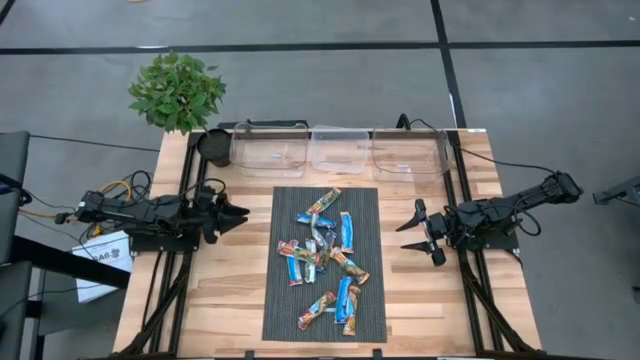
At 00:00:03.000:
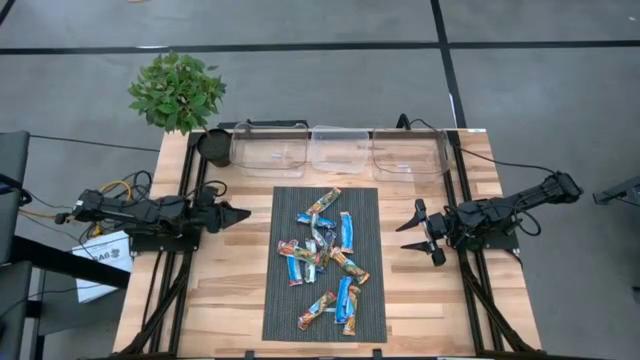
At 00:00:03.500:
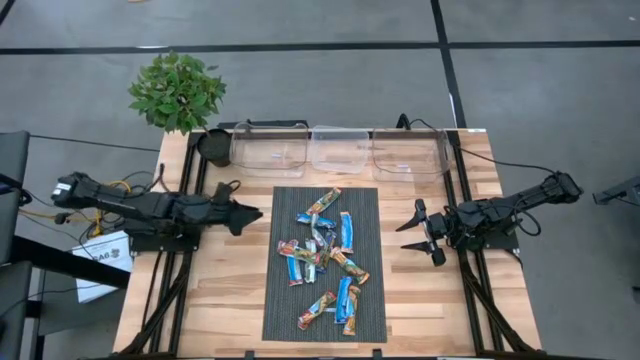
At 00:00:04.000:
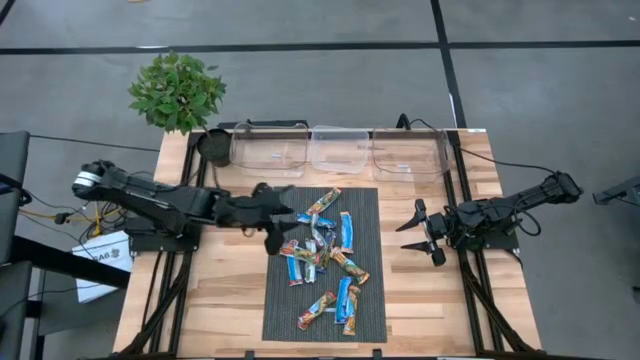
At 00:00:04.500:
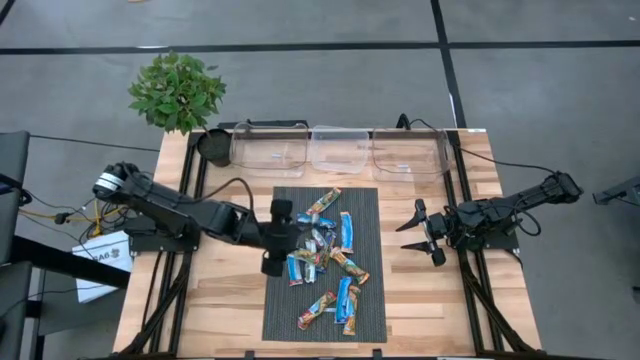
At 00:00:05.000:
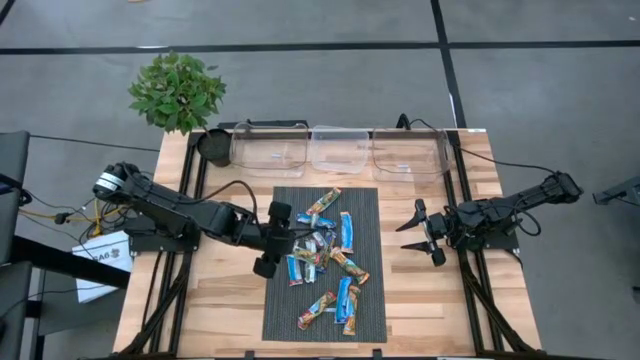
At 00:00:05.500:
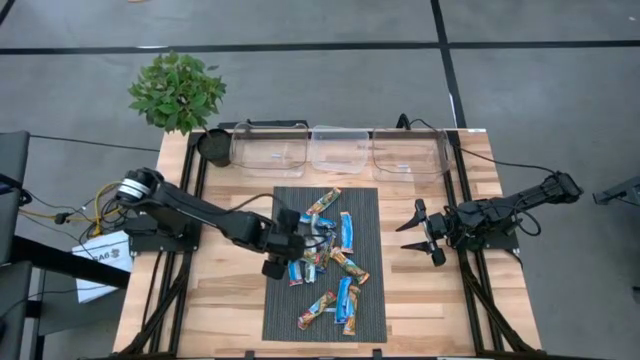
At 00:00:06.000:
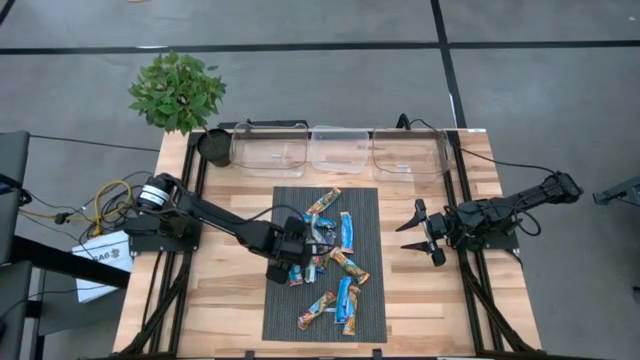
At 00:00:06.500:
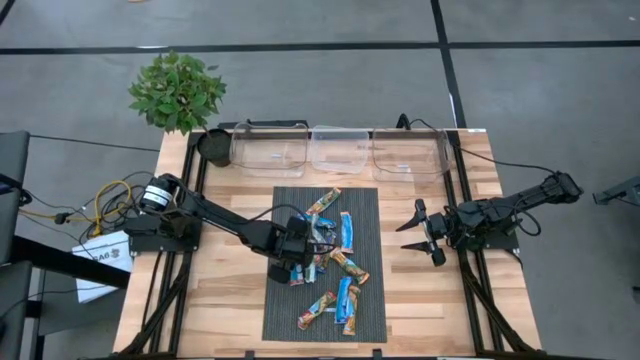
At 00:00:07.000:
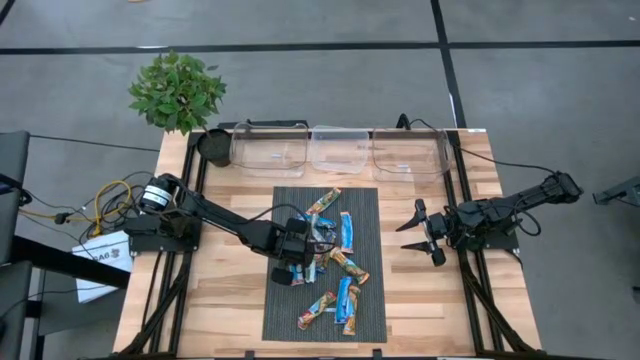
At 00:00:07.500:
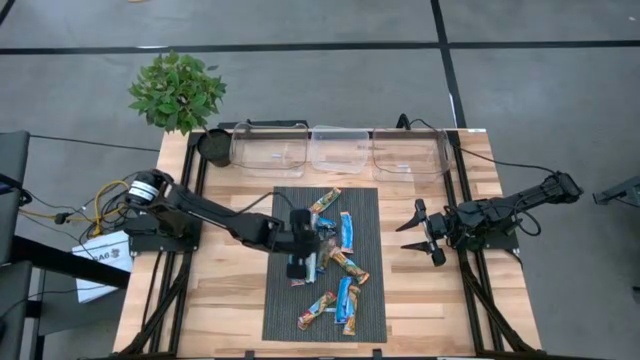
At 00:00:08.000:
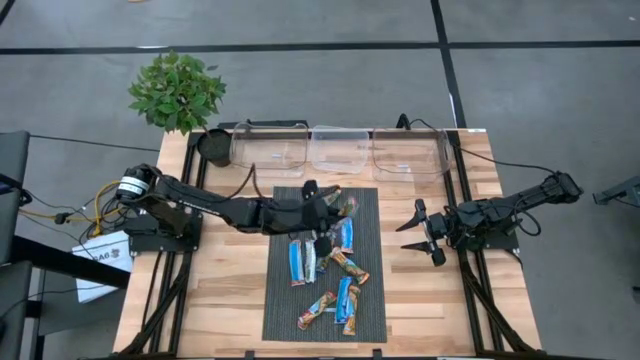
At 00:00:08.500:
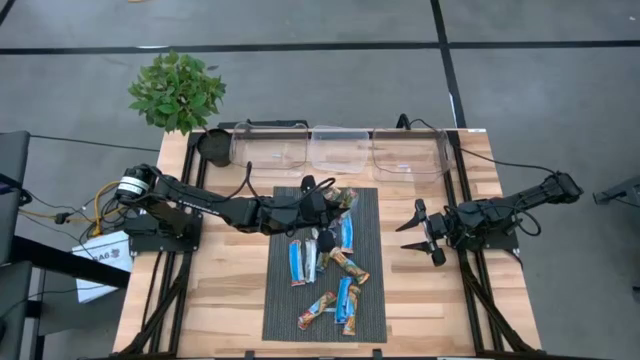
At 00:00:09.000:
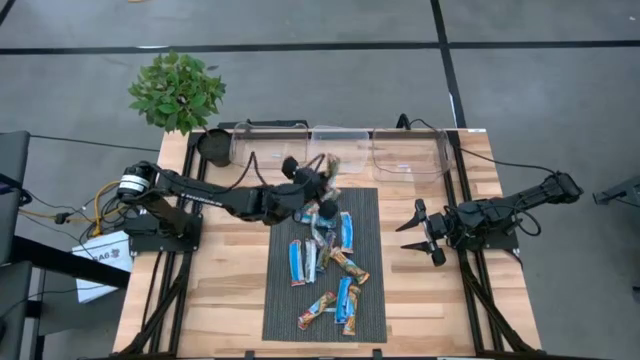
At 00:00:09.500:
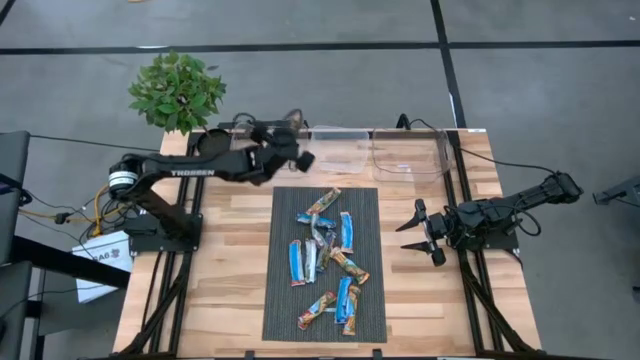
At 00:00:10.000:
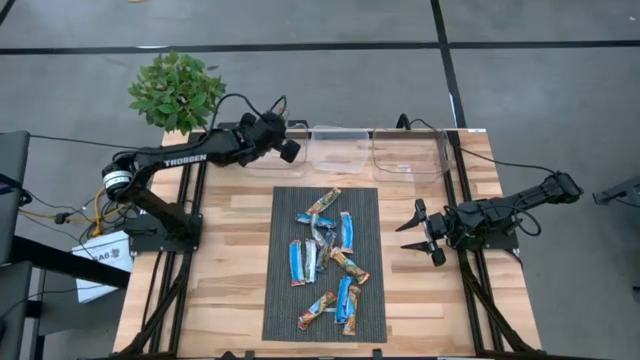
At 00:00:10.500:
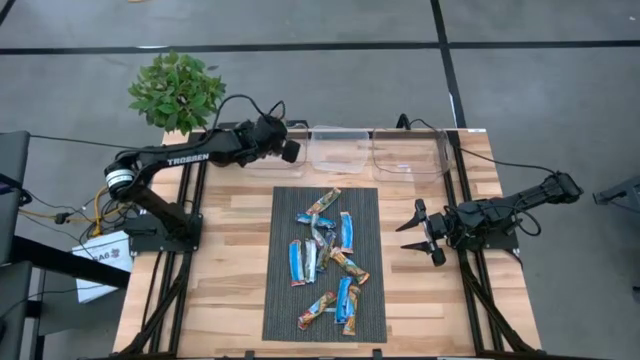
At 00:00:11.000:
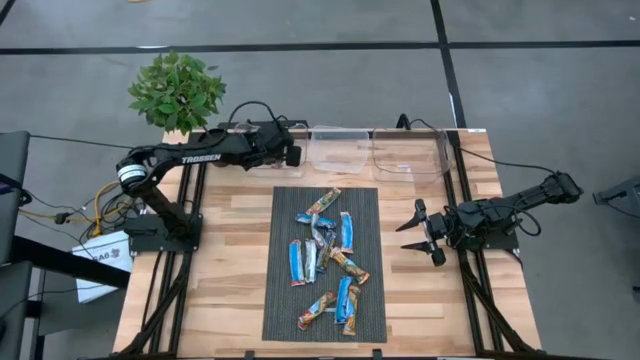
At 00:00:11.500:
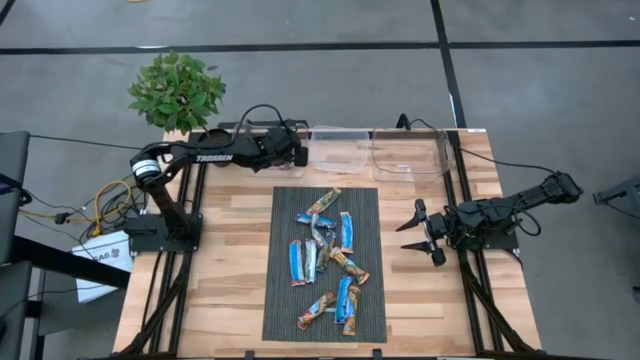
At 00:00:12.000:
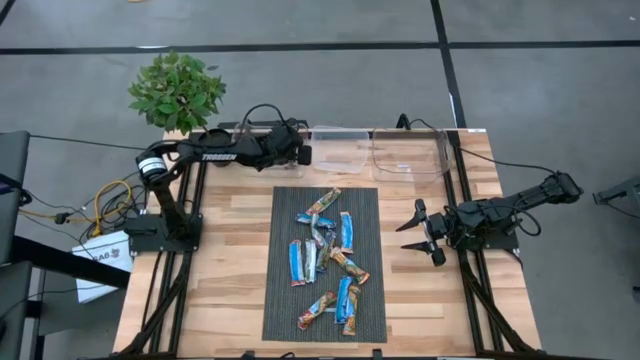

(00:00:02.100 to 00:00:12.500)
Task: Pick and place Granola Bars by type
Put the red granola bar into the left transparent bin

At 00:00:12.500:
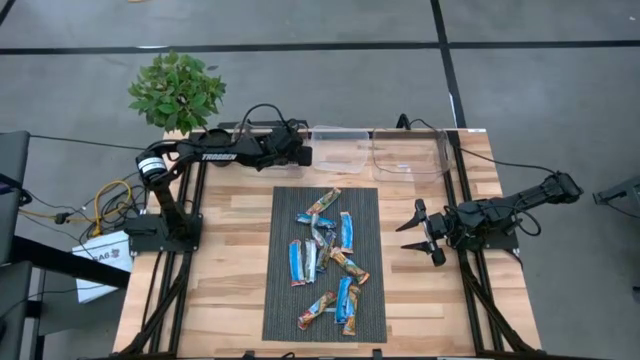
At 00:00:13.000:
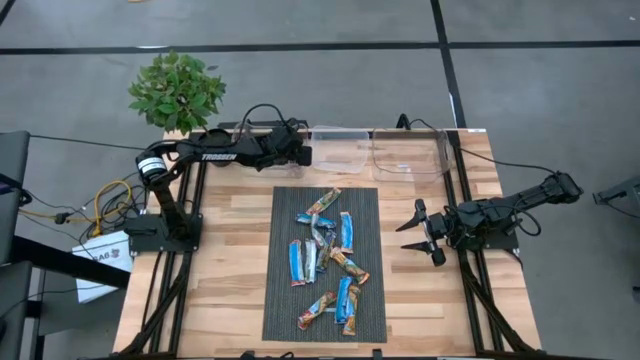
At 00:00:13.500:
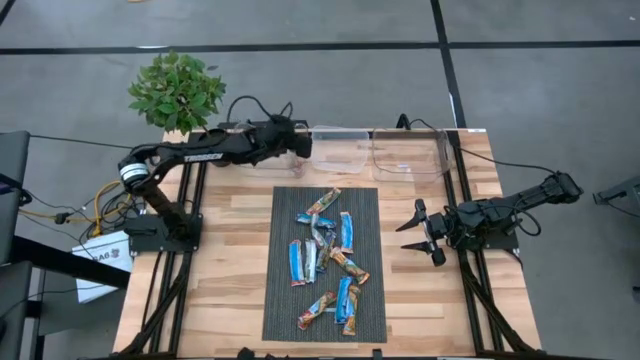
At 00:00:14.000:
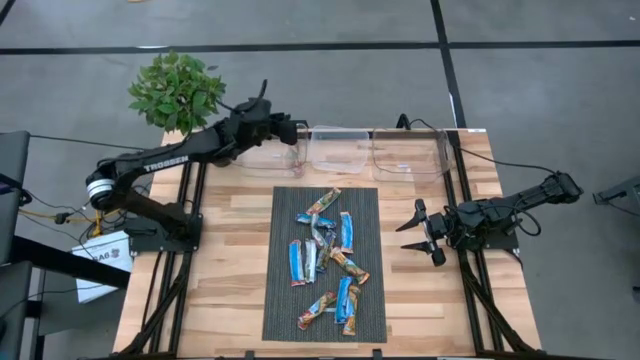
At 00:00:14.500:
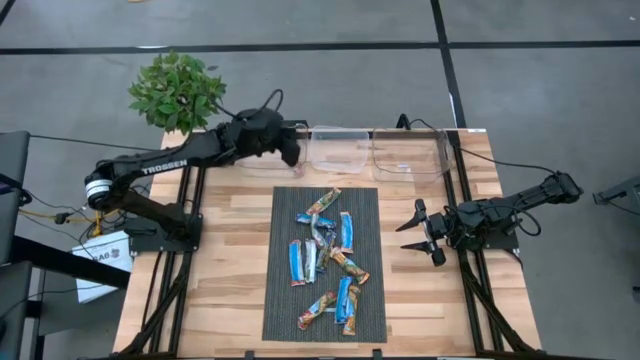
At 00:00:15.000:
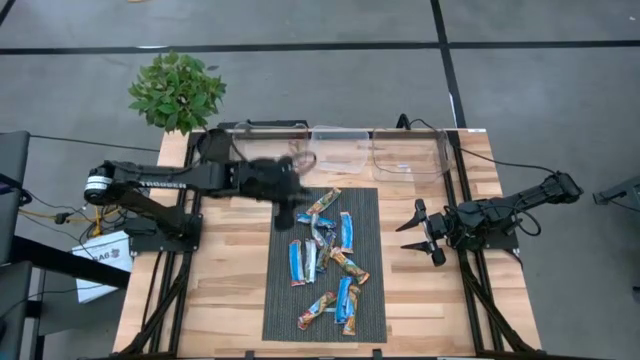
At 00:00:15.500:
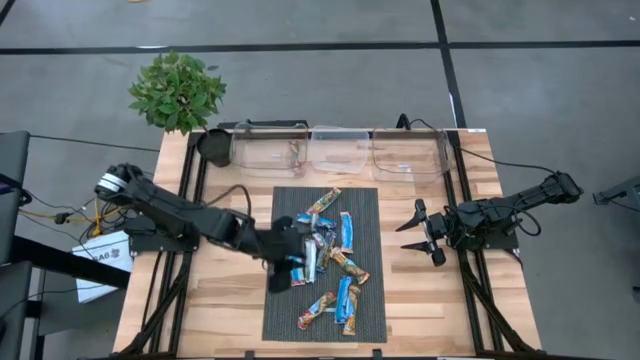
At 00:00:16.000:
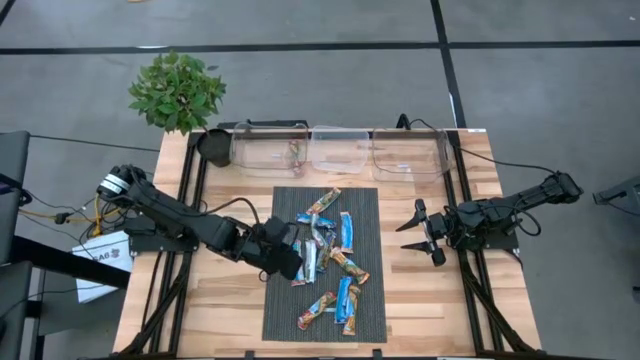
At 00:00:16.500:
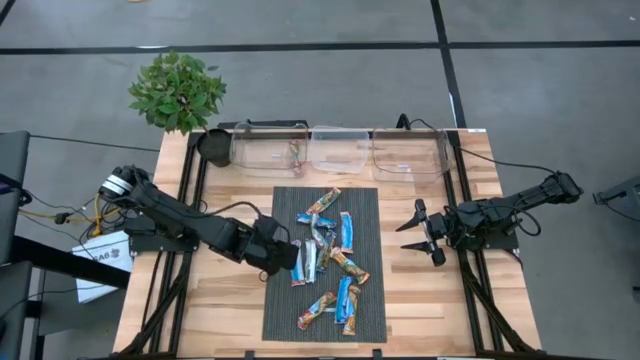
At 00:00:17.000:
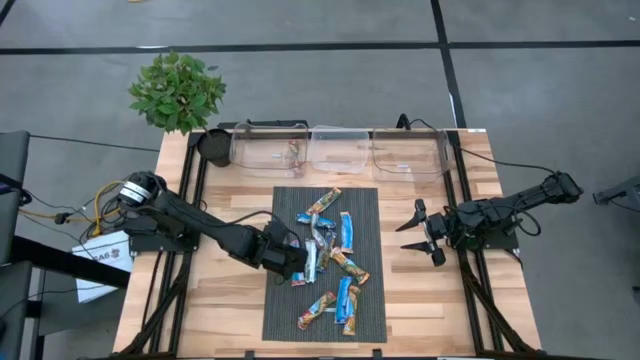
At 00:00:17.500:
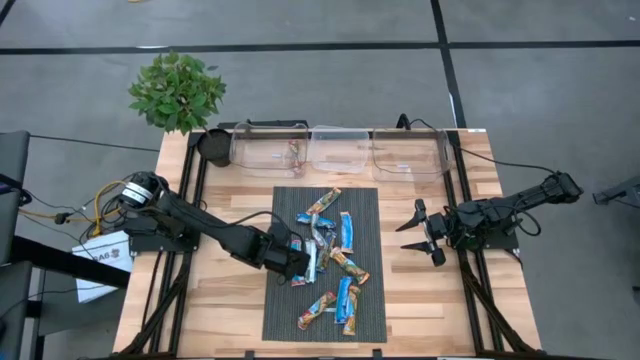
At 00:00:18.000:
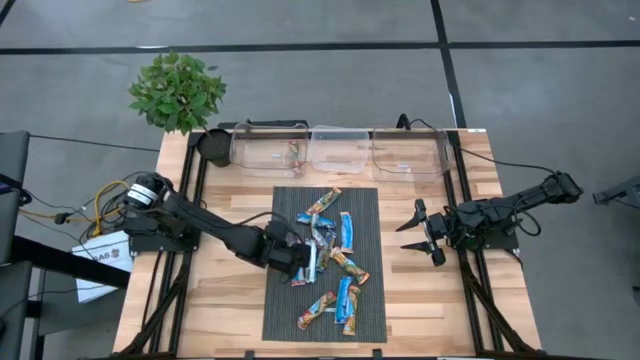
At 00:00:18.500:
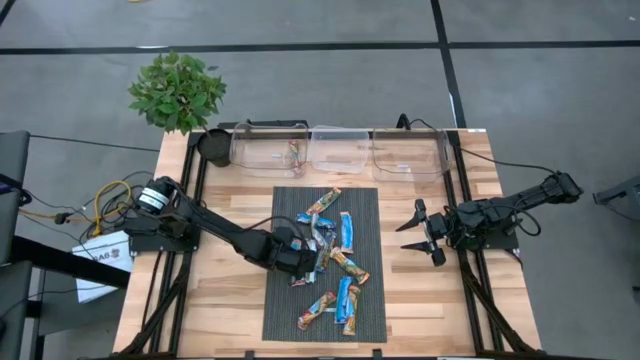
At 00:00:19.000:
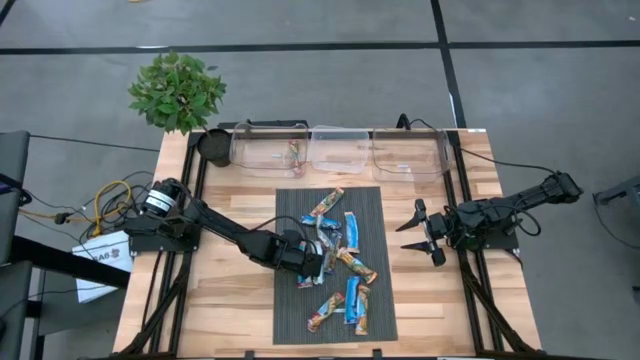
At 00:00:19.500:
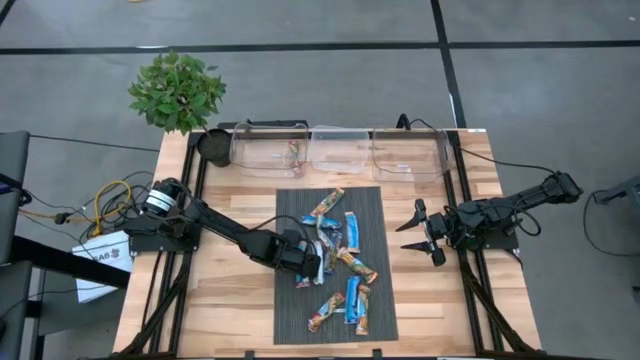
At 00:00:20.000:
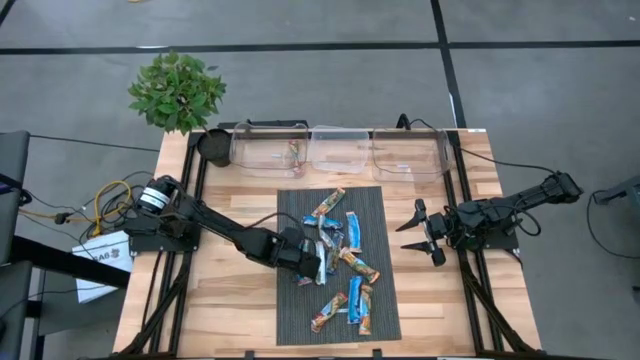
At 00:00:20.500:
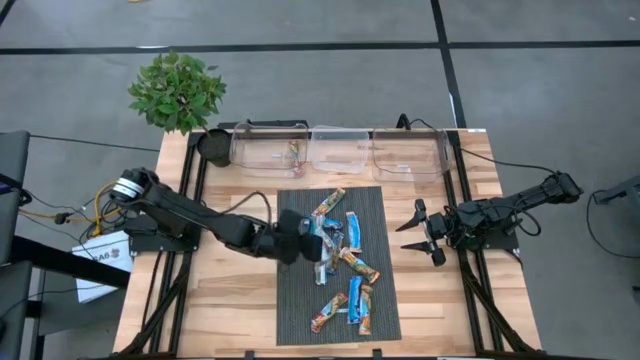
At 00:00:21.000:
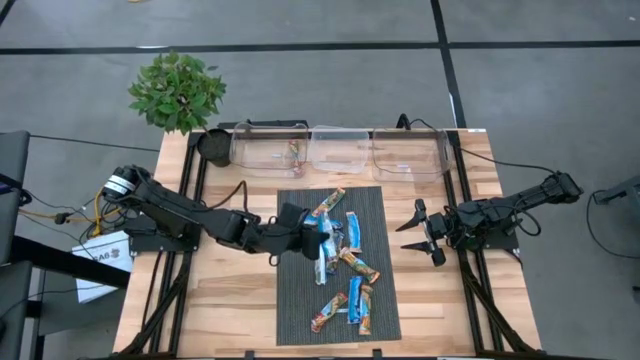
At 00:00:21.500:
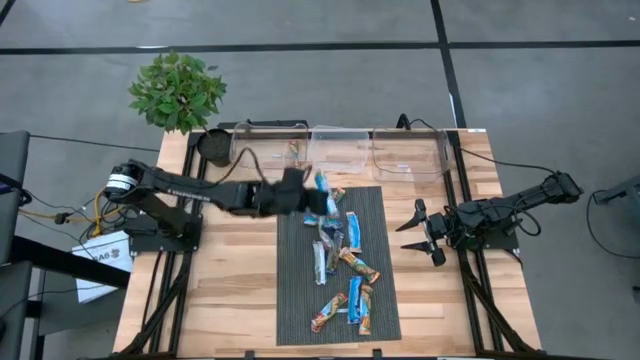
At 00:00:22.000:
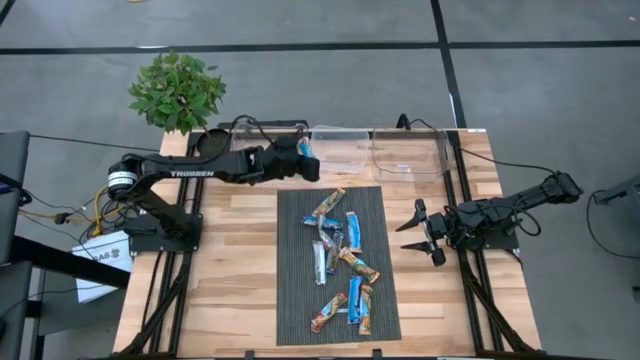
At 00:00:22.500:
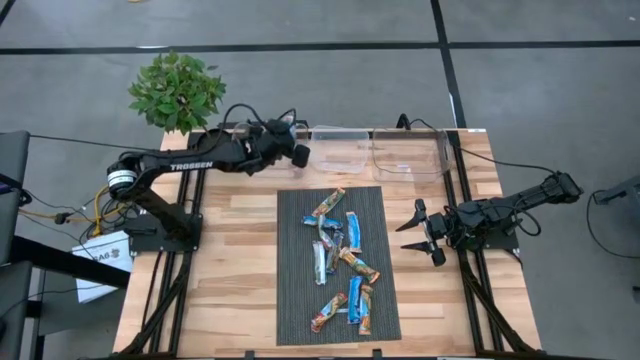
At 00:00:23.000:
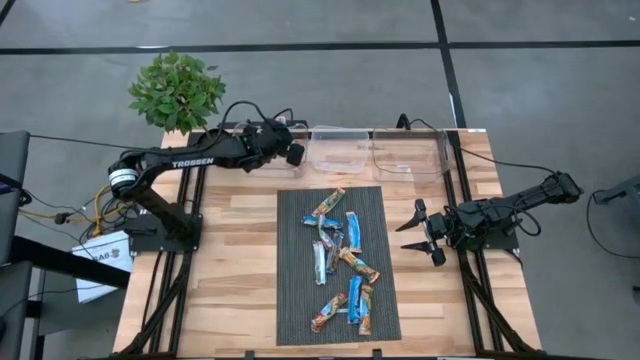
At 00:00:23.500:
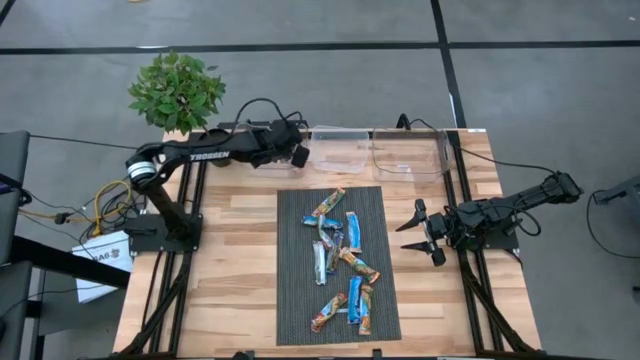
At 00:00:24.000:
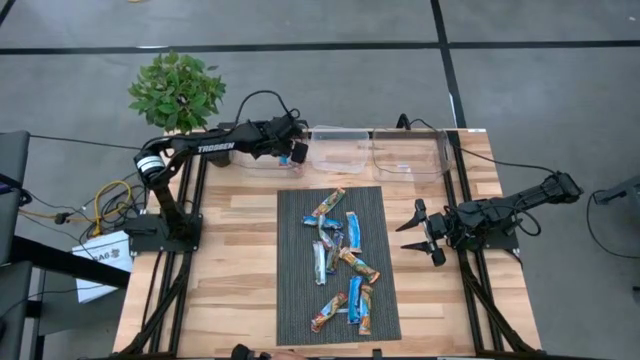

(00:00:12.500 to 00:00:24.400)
Put the red granola bar into the left transparent bin
